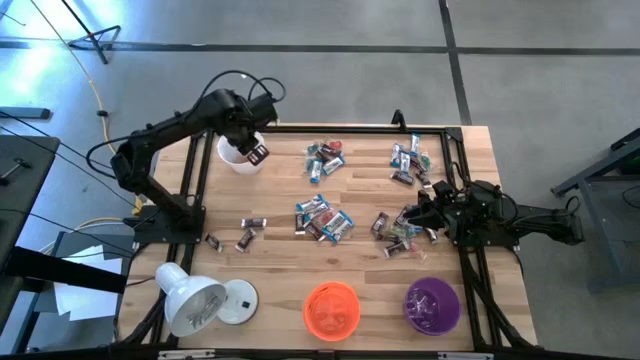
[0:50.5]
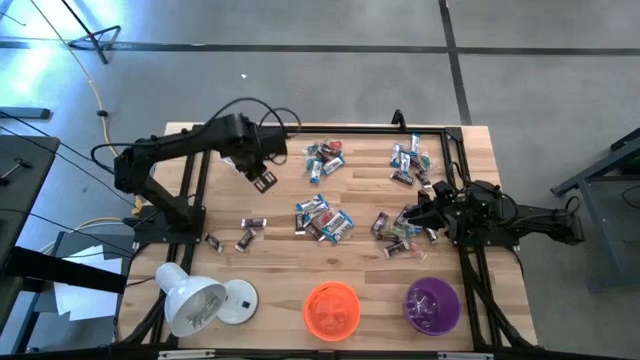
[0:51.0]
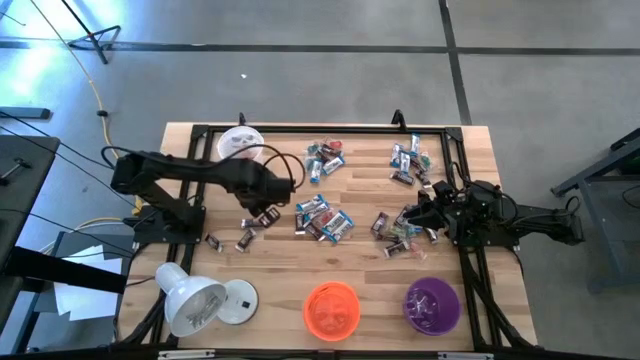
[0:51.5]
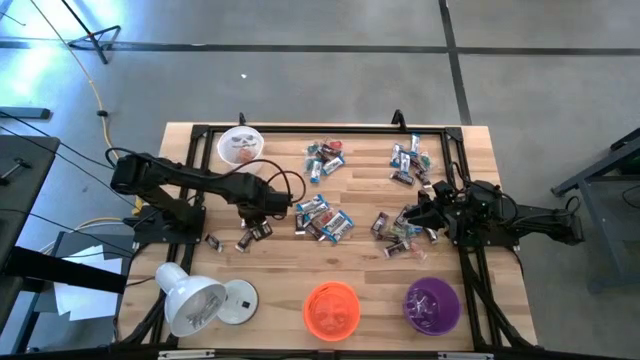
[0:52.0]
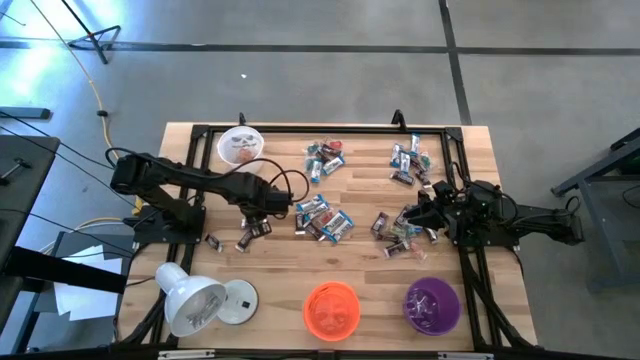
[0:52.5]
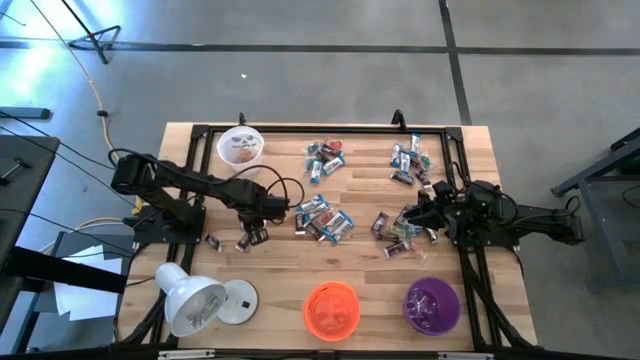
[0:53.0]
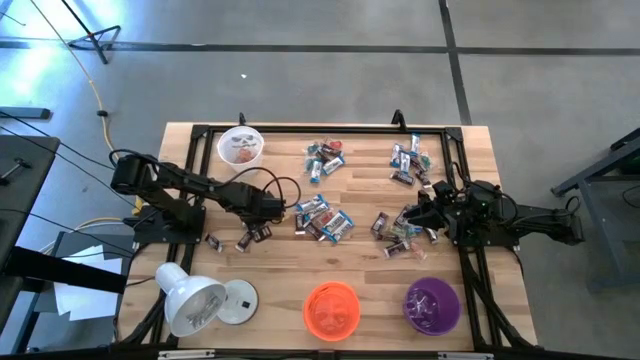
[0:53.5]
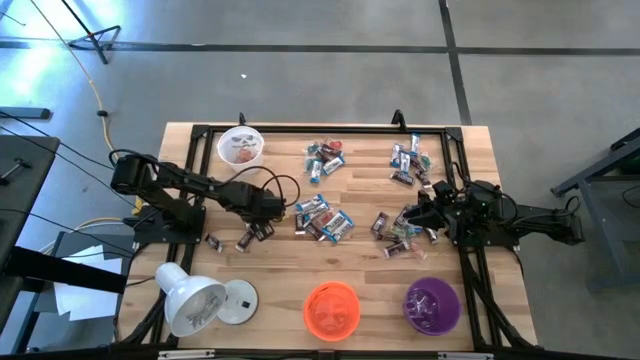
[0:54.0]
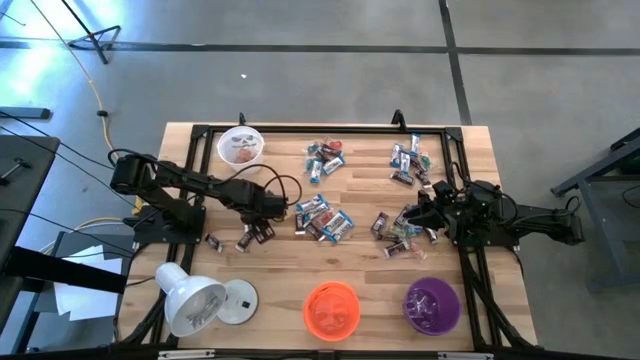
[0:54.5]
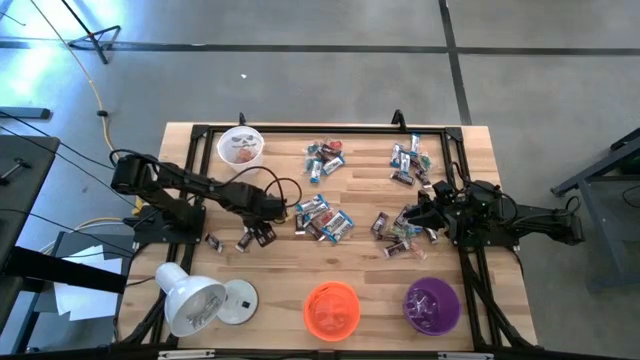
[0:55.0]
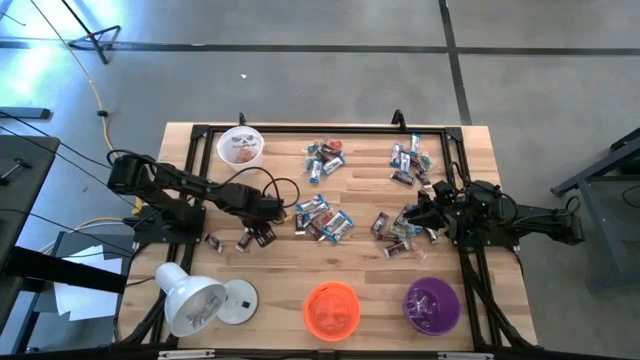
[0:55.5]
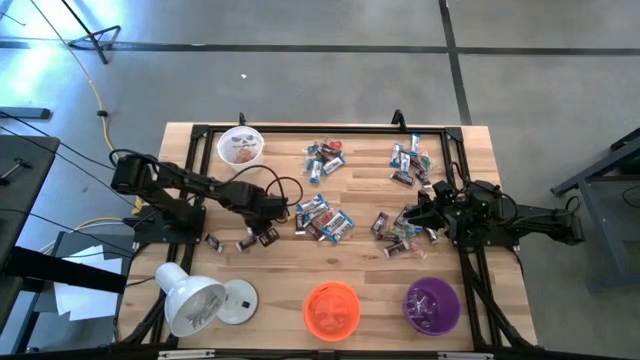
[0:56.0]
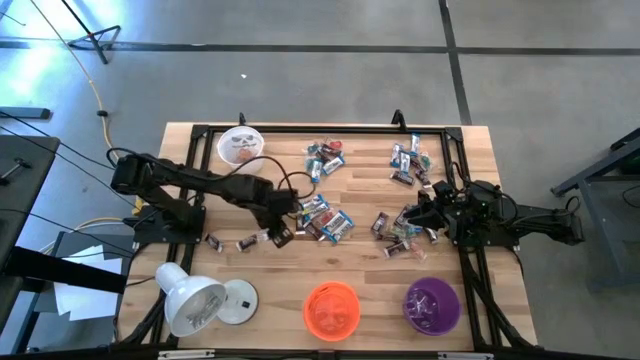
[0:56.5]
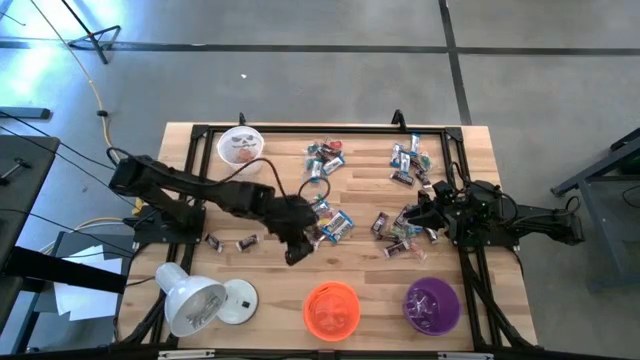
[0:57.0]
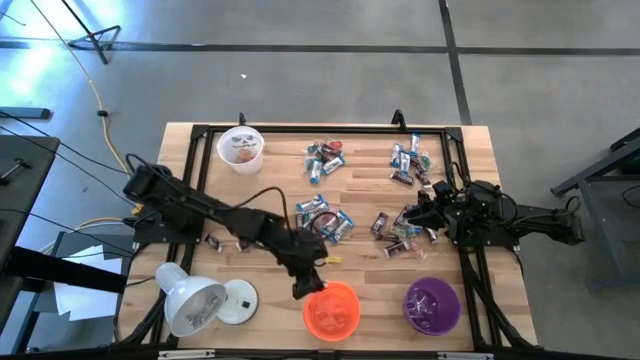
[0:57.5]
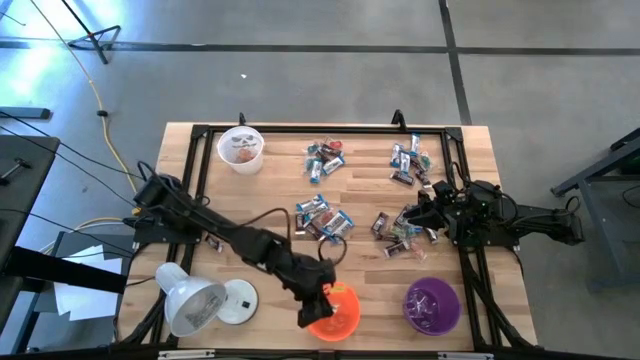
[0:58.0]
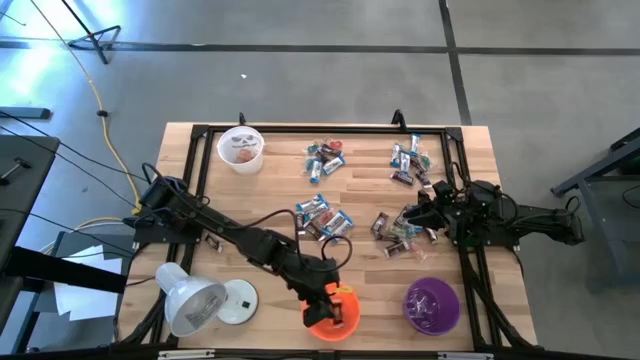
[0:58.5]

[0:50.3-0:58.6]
Task: Organize candy in baskets
Put the brown chocolate into the orange bucket

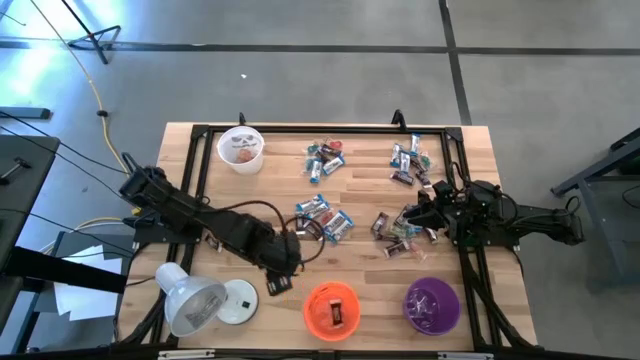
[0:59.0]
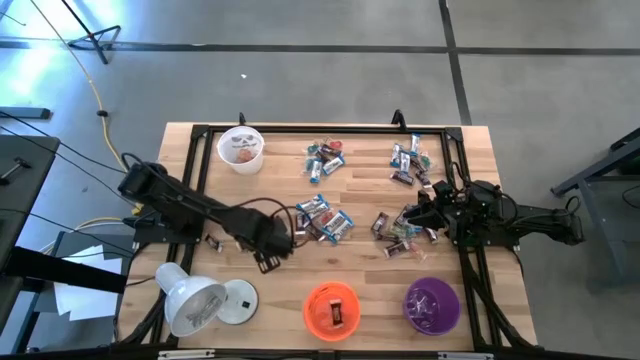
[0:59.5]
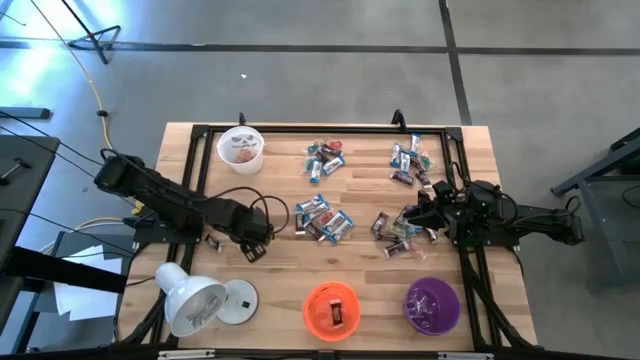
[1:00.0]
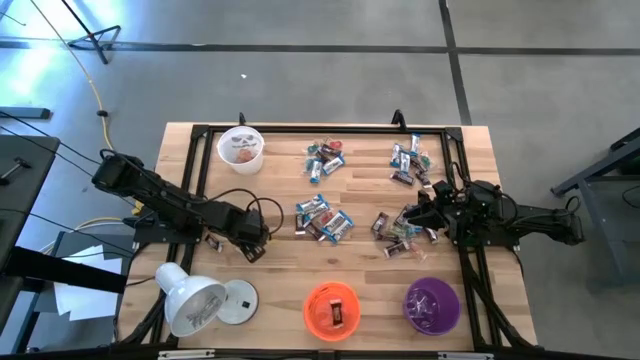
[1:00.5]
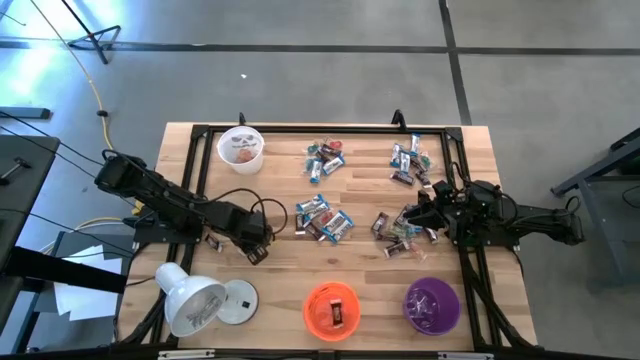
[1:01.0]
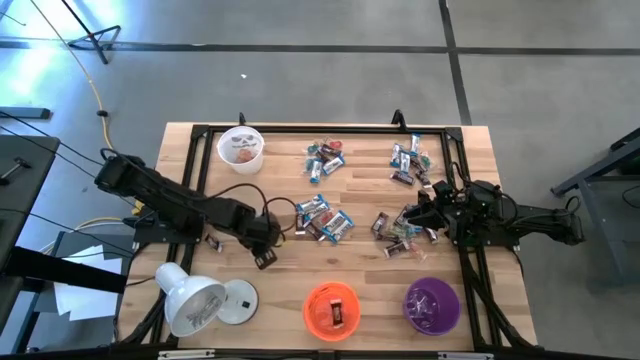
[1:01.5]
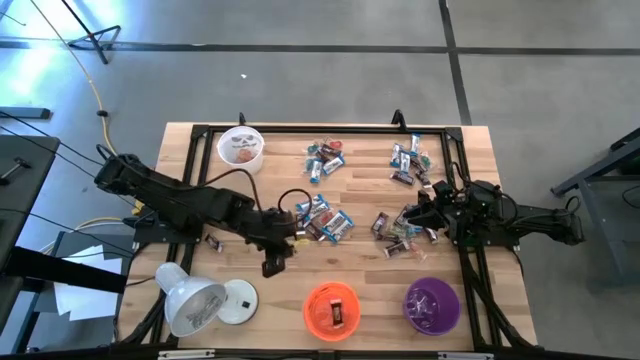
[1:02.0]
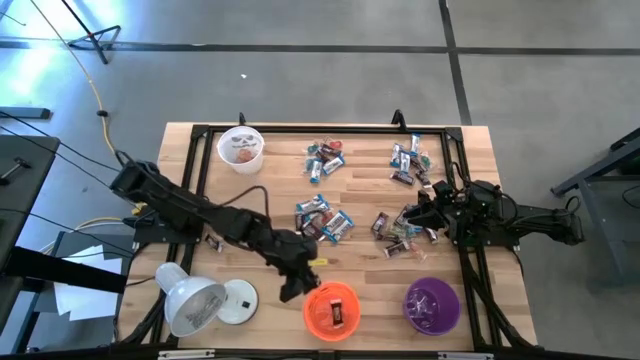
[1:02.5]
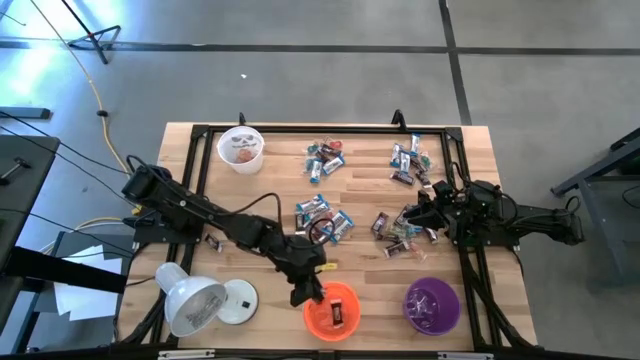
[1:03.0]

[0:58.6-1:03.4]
Put the brown chocolate into the orange bucket

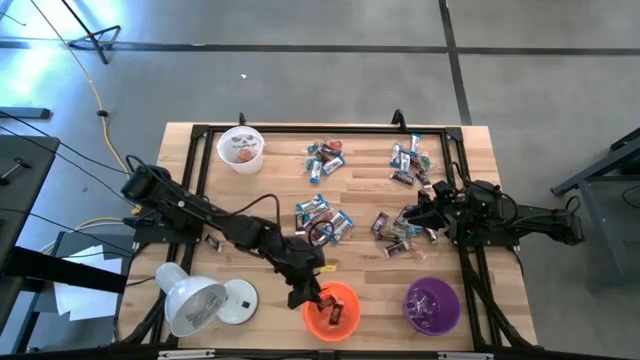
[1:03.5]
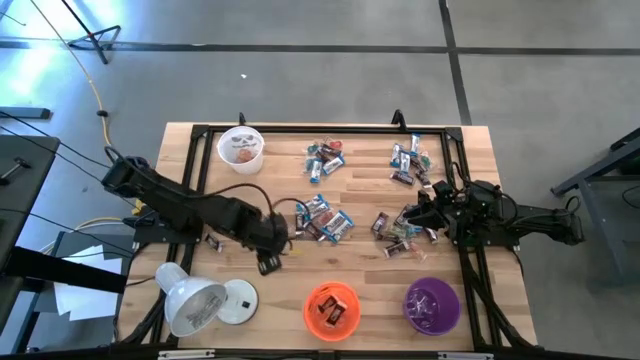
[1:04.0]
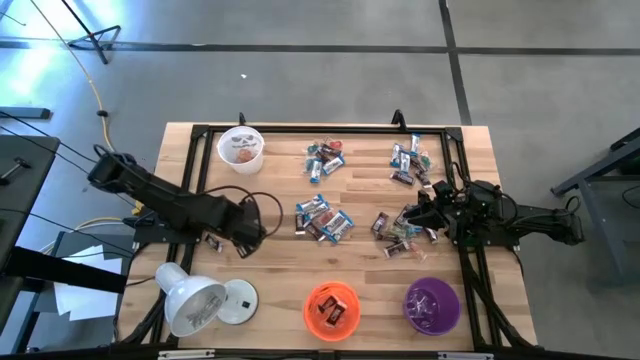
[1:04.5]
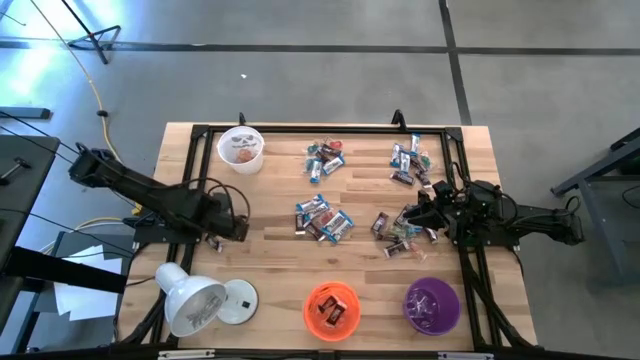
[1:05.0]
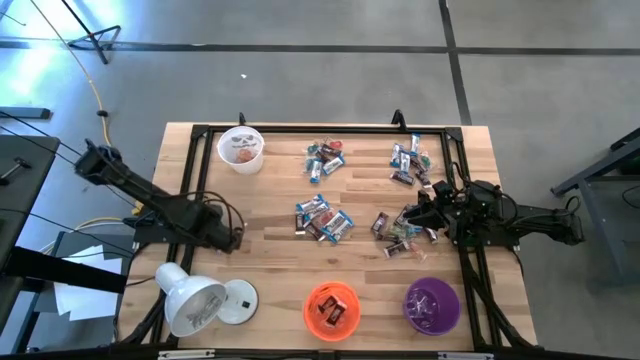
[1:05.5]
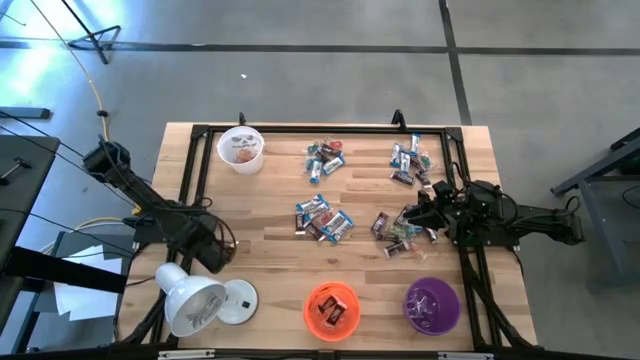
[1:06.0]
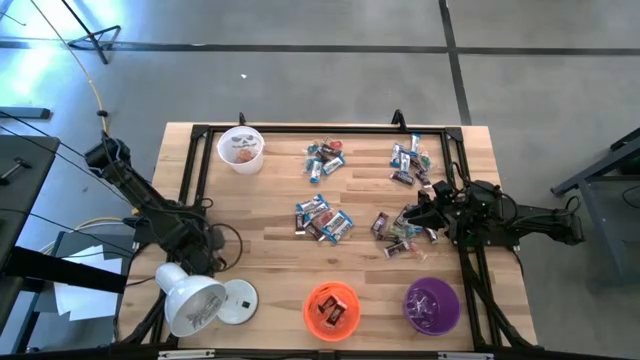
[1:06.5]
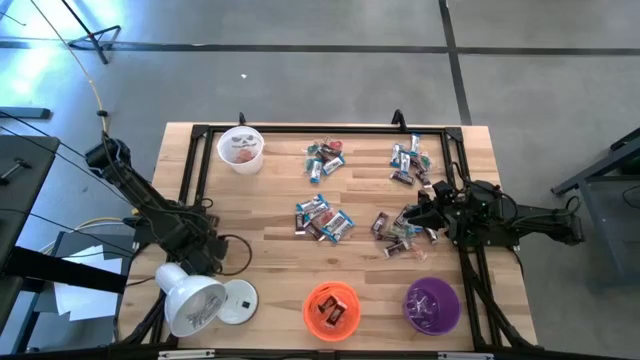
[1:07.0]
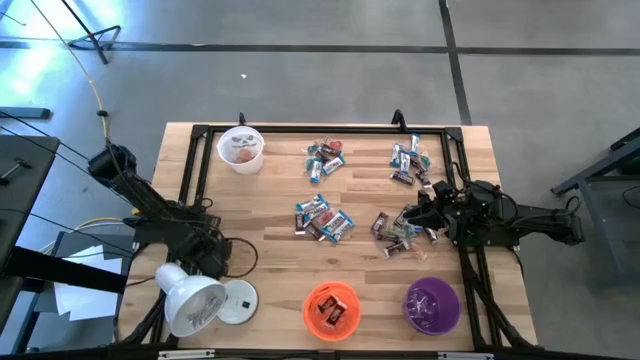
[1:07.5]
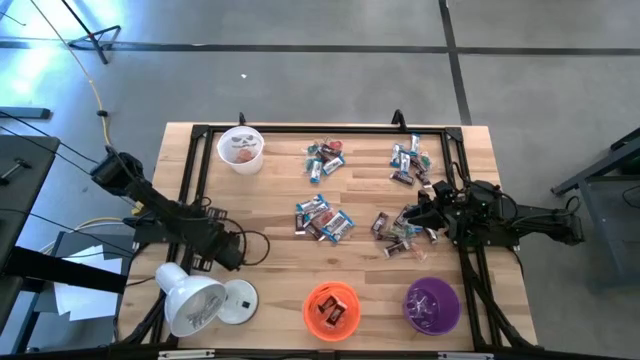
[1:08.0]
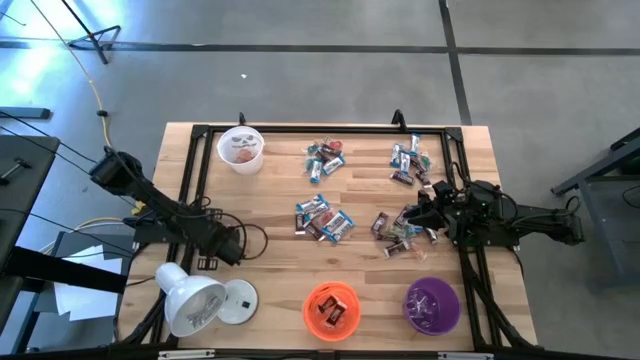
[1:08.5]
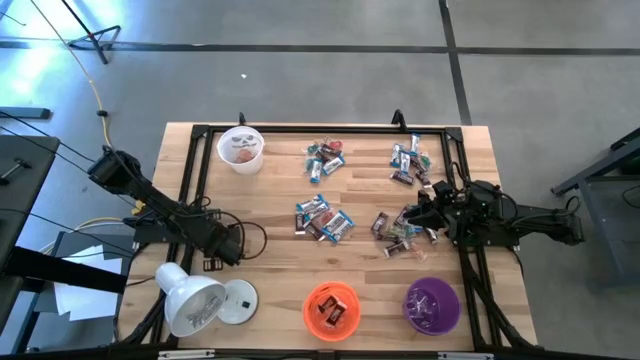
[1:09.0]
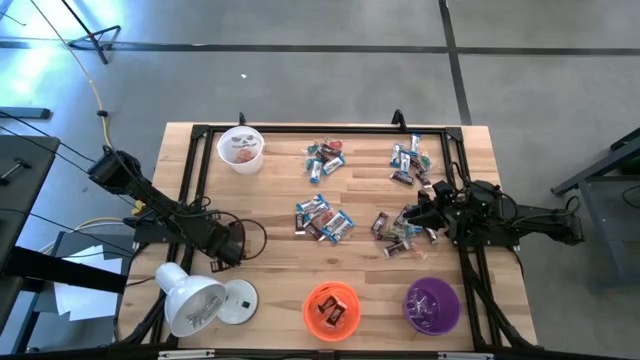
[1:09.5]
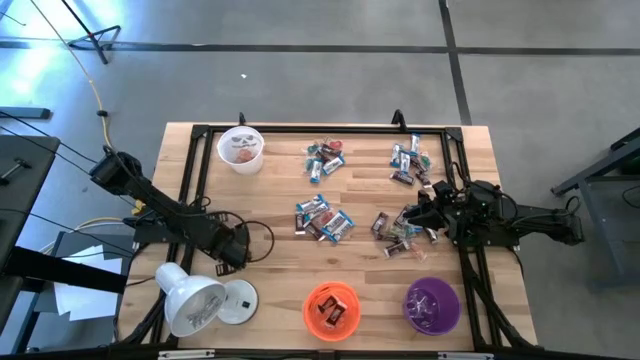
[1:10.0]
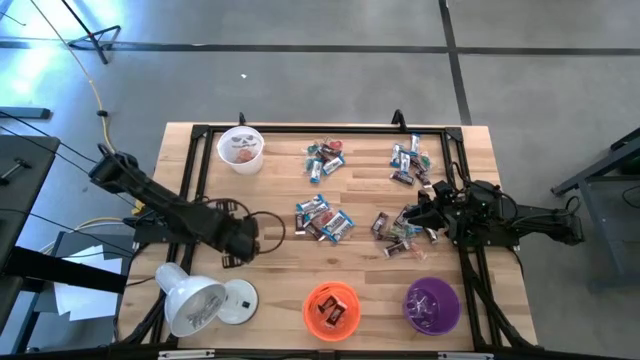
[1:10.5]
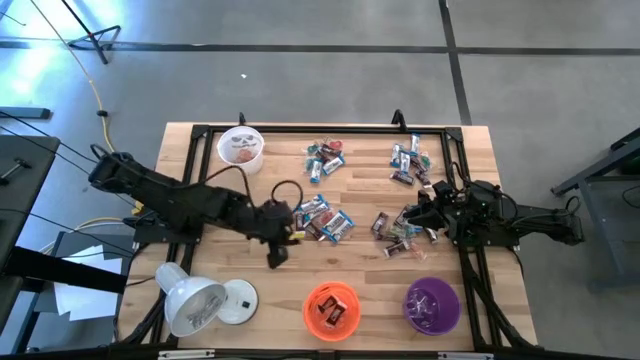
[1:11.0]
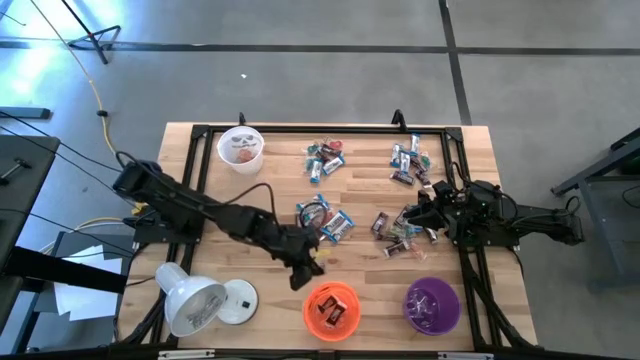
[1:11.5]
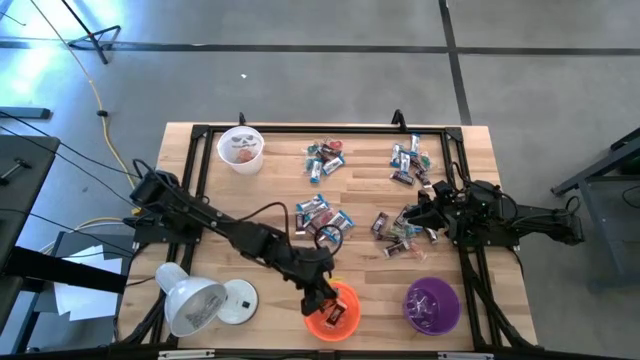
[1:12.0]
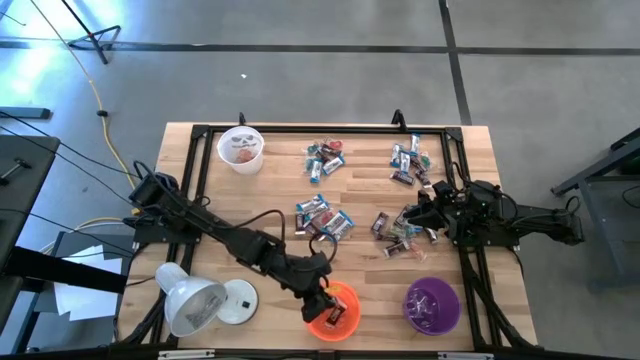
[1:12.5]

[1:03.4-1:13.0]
Put the brown chocolate into the orange bucket
